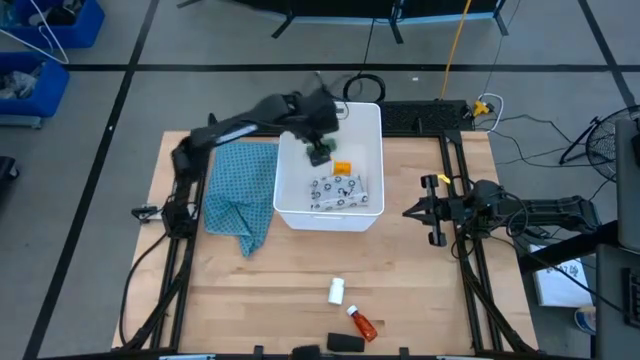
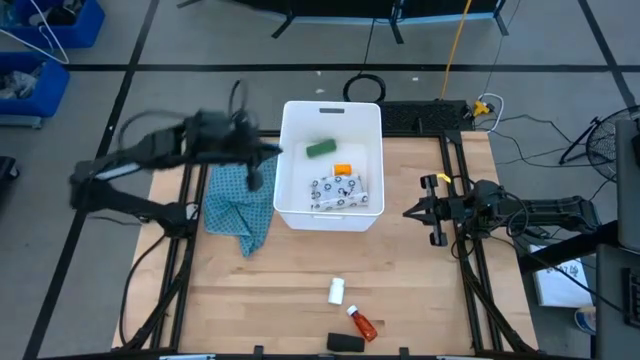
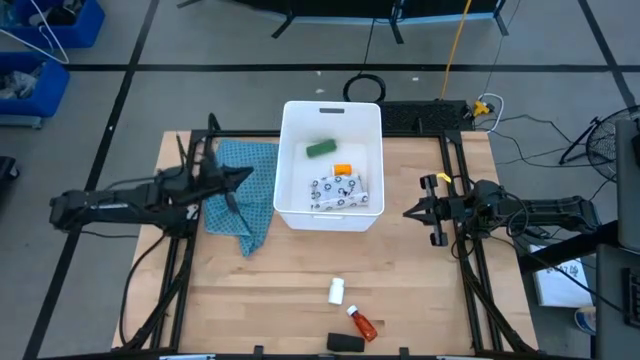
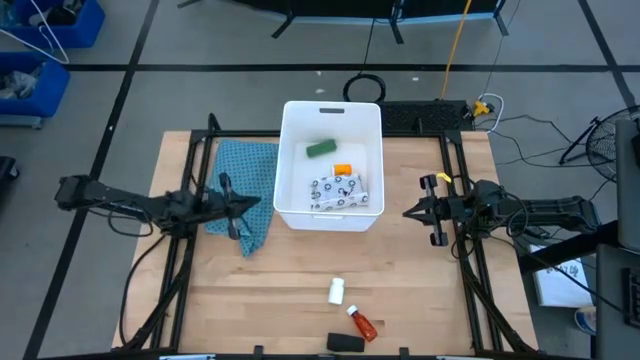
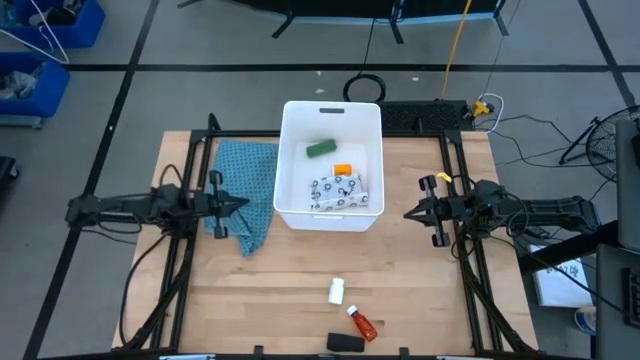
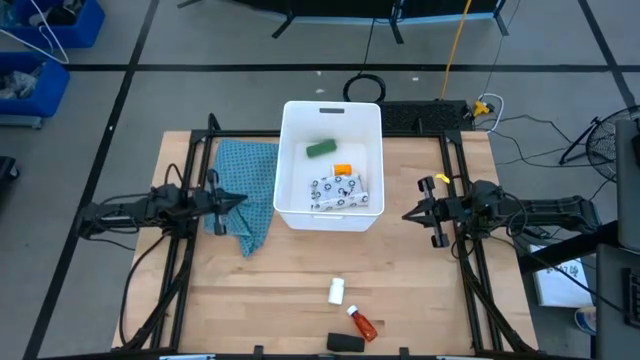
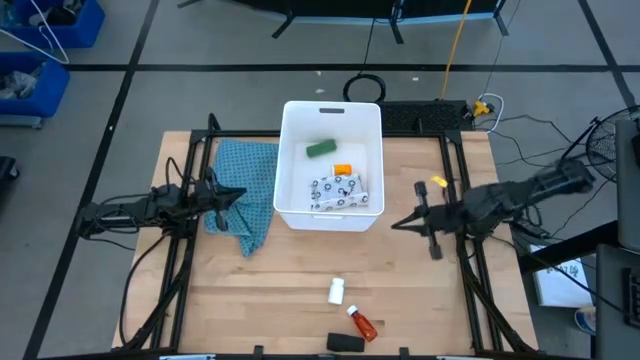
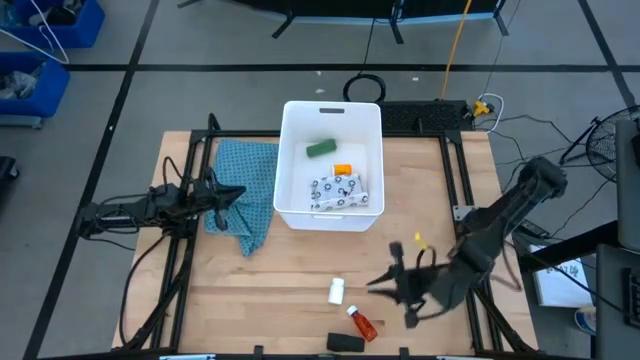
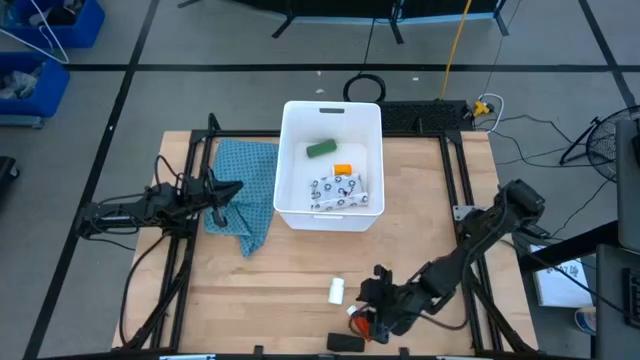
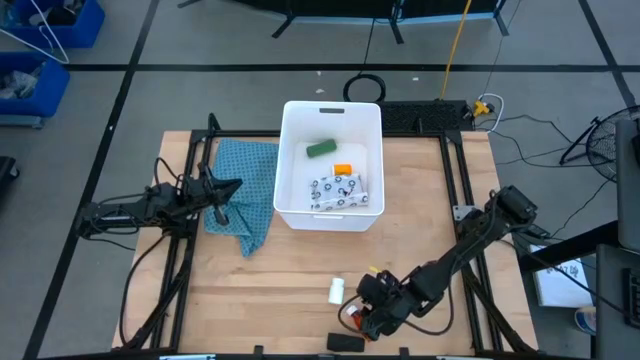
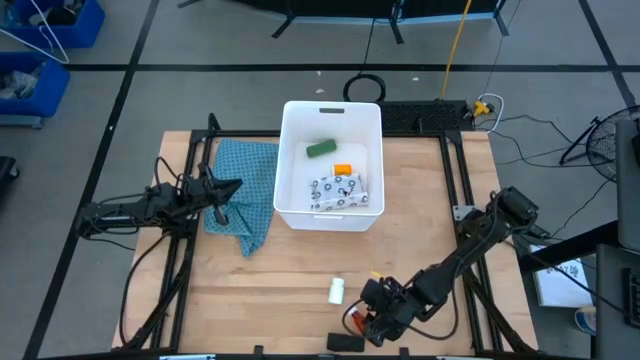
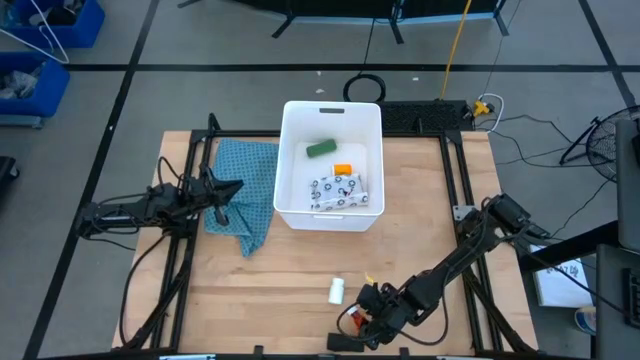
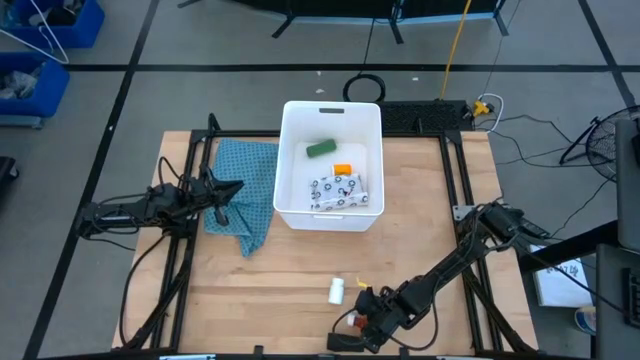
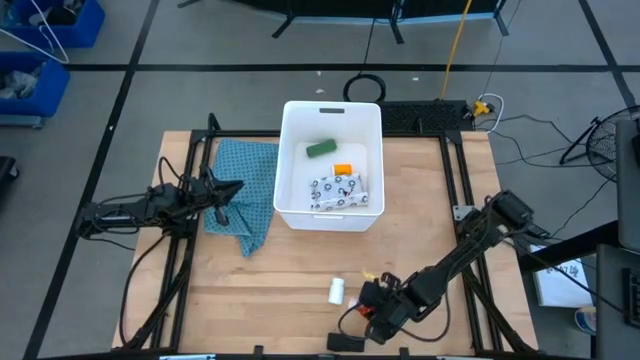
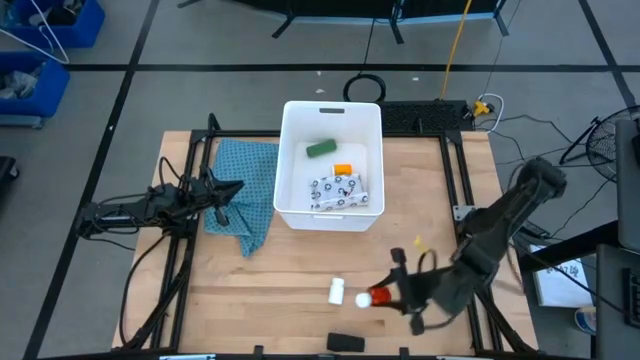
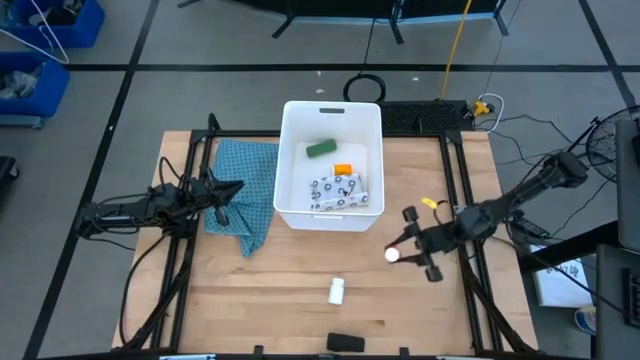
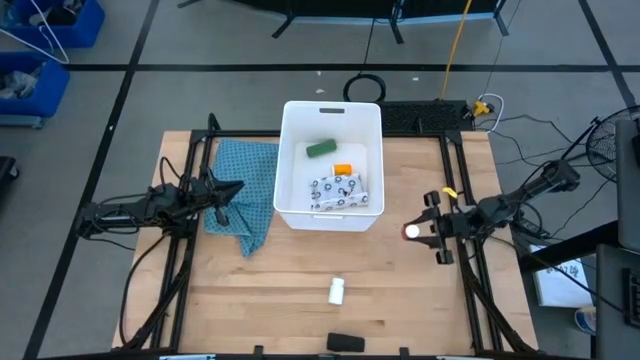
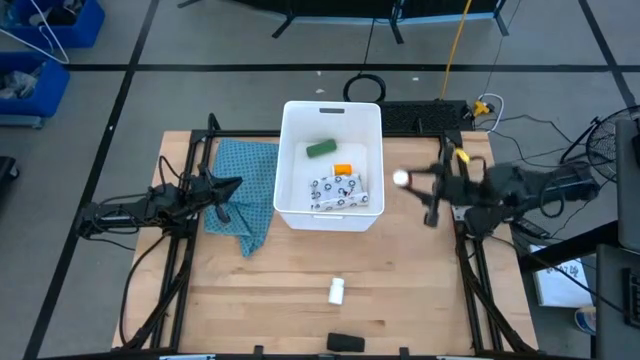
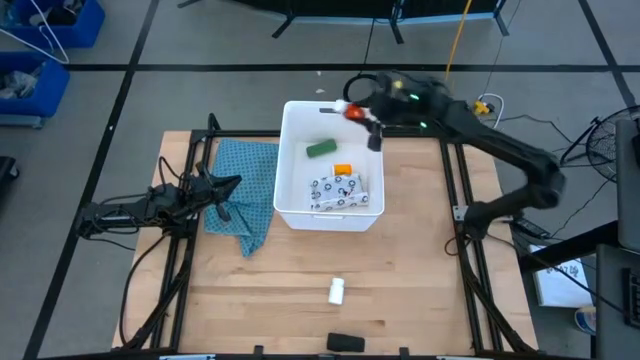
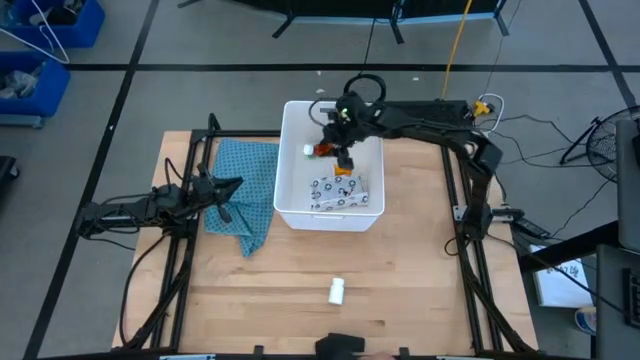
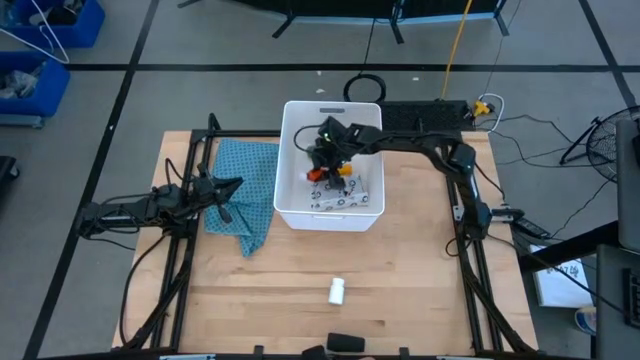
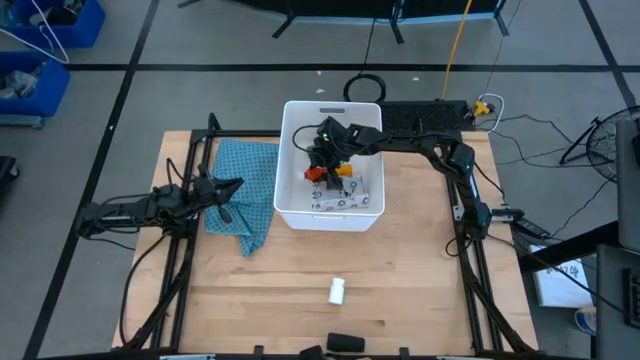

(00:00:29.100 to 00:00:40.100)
Task: Pick & place medical supplies in basket/bin
Put the red medicine bottle into the white bin

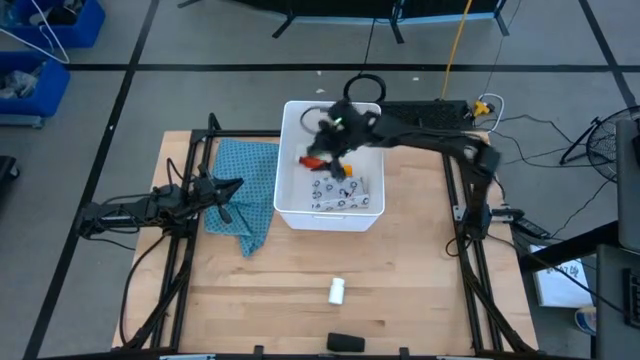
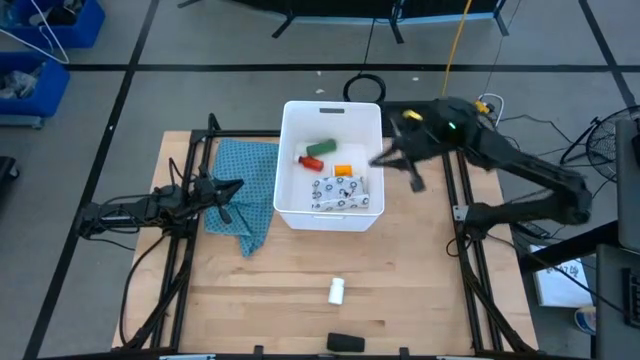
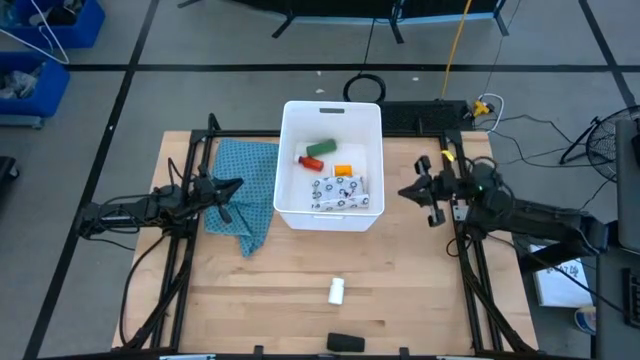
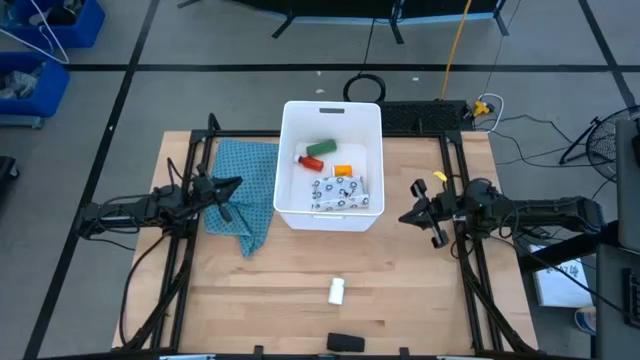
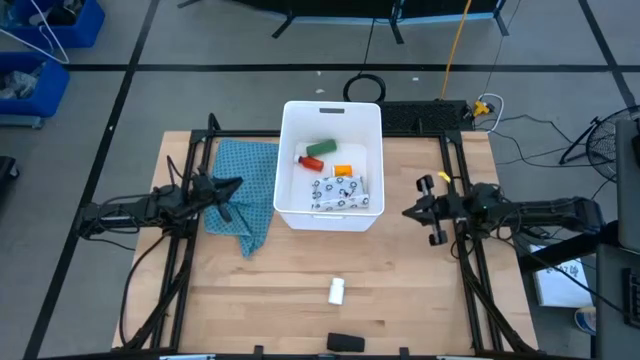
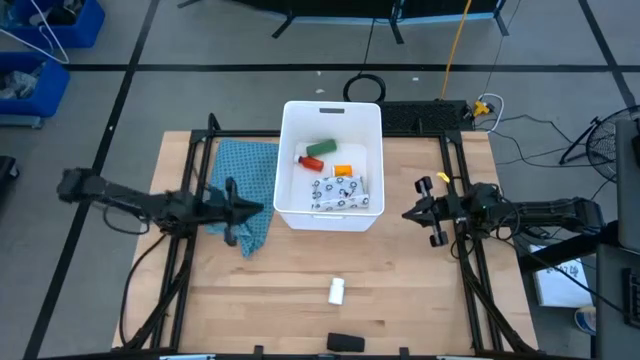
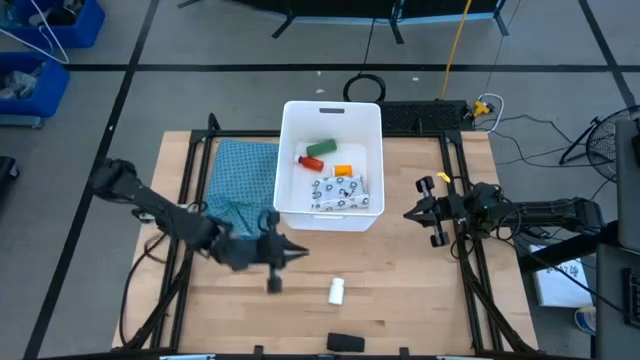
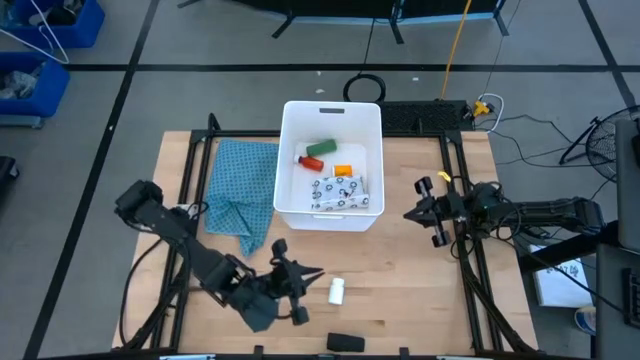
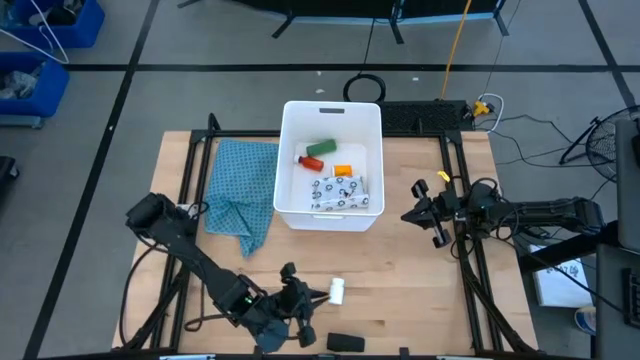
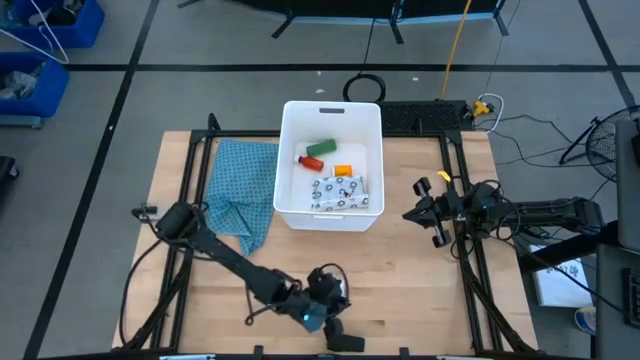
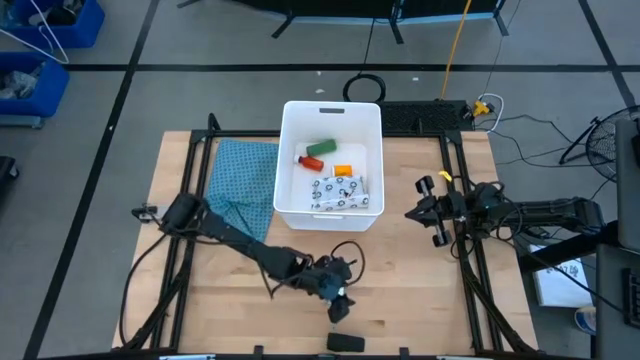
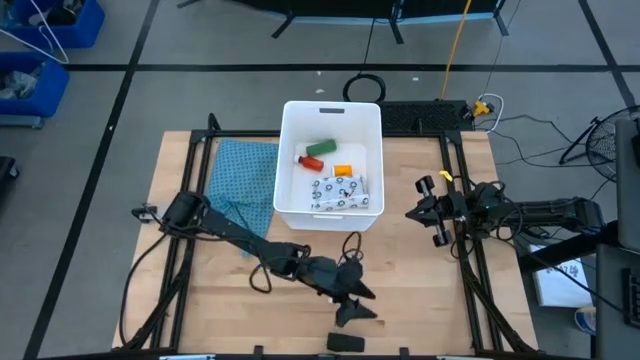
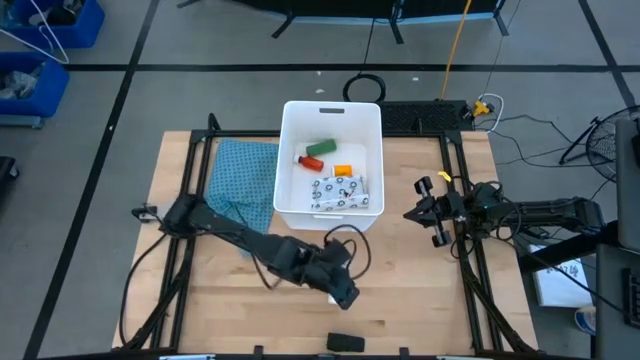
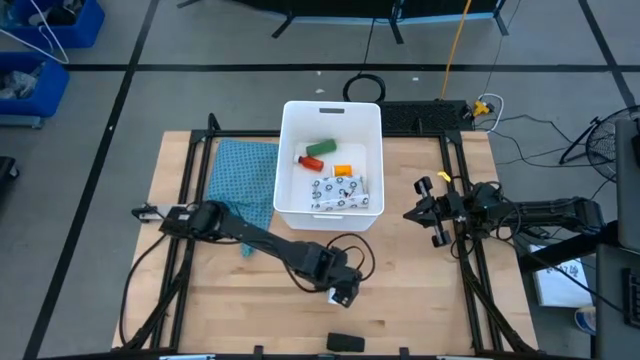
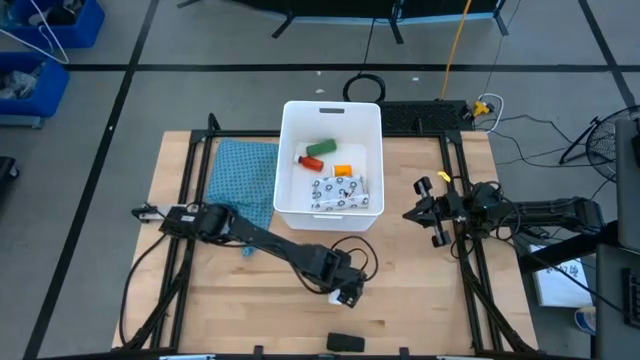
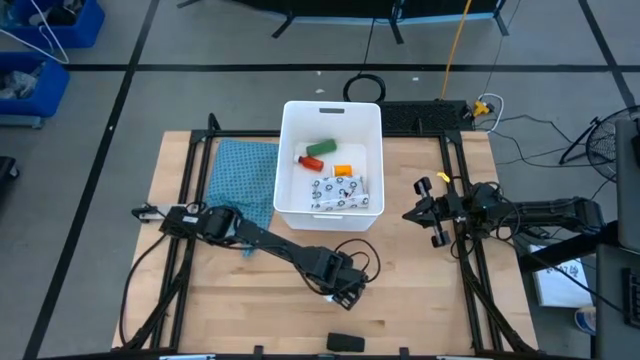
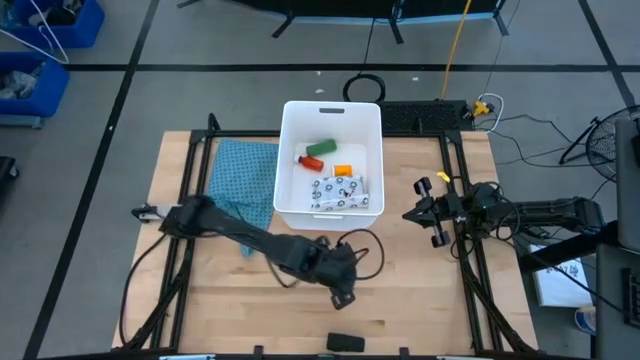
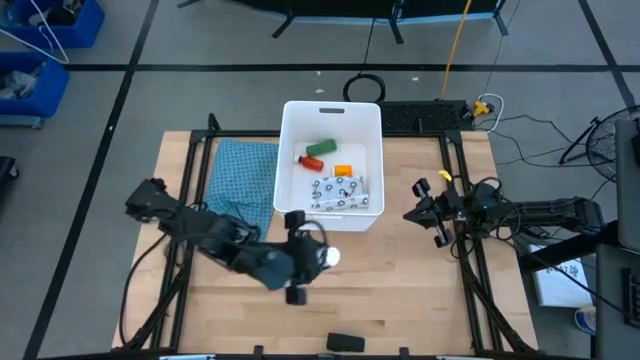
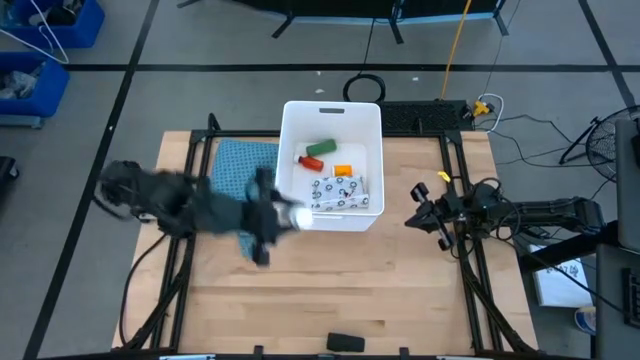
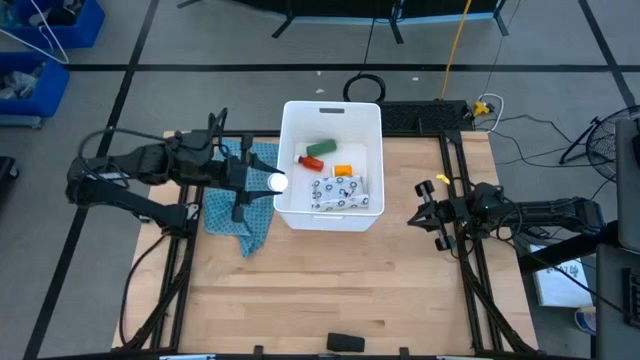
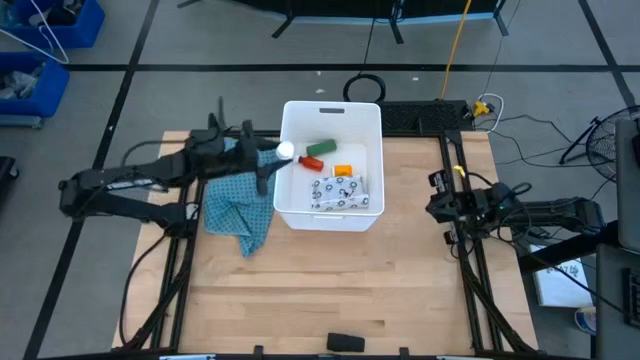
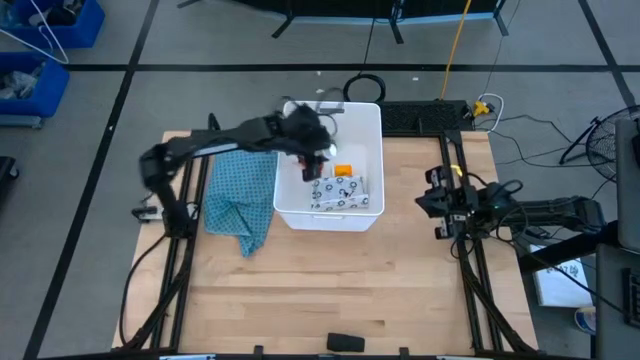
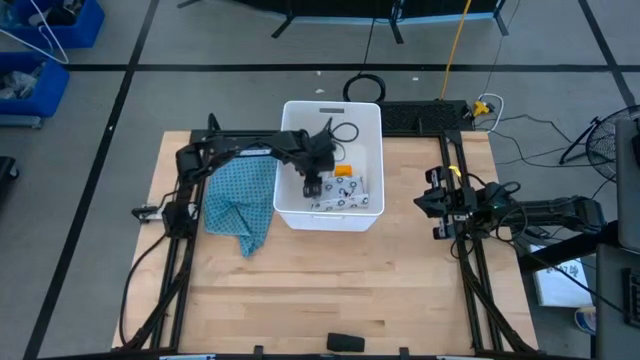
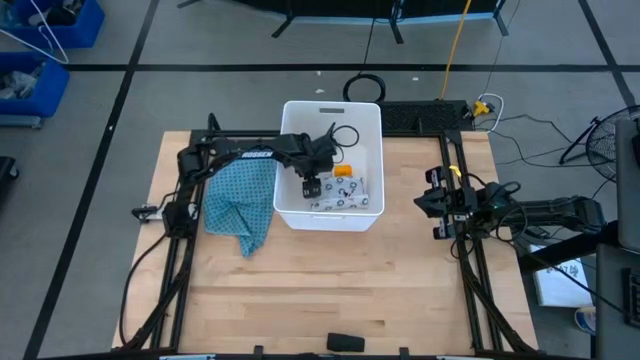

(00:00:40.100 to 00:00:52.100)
Put the white medicine bottle into the white bin
